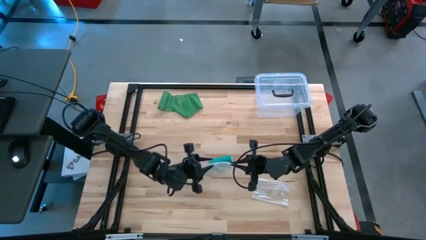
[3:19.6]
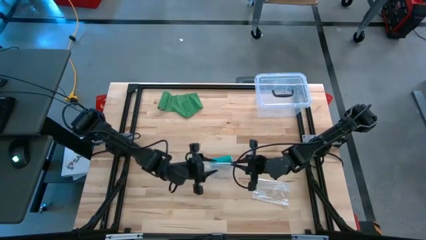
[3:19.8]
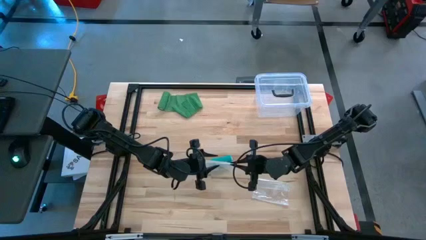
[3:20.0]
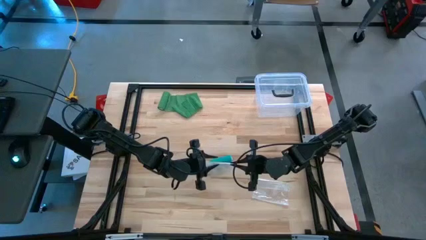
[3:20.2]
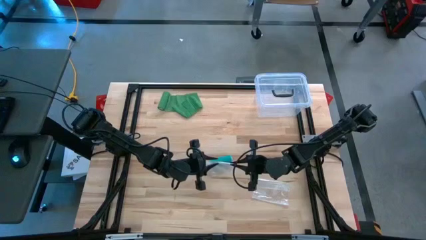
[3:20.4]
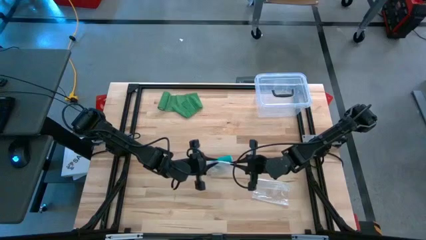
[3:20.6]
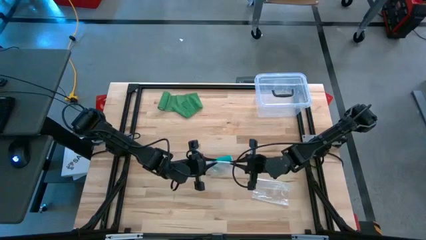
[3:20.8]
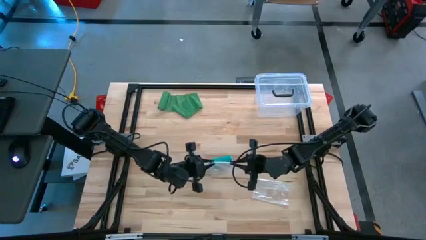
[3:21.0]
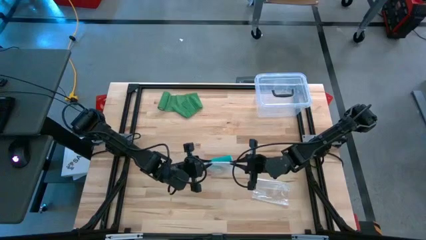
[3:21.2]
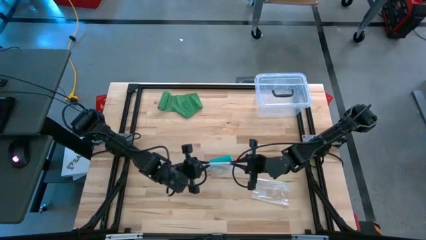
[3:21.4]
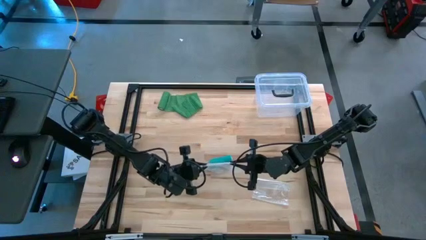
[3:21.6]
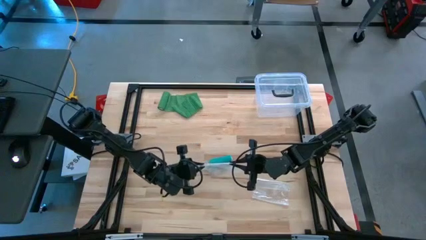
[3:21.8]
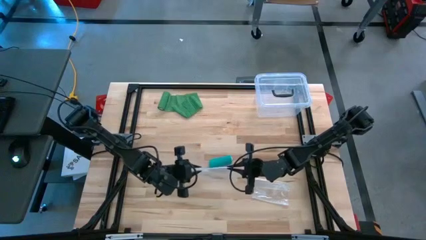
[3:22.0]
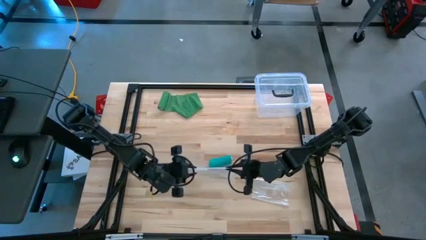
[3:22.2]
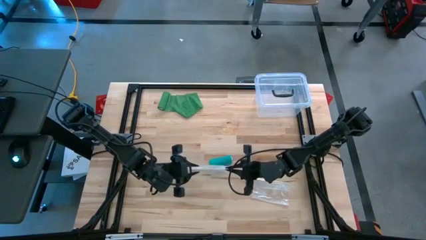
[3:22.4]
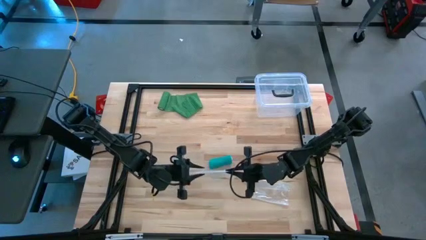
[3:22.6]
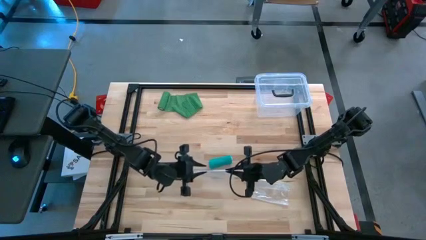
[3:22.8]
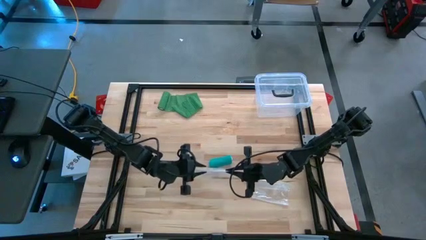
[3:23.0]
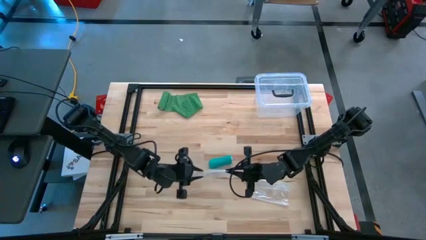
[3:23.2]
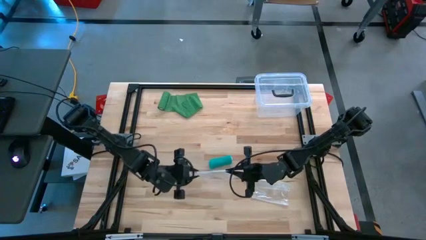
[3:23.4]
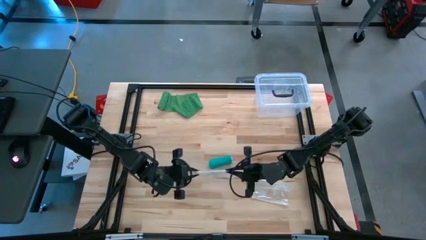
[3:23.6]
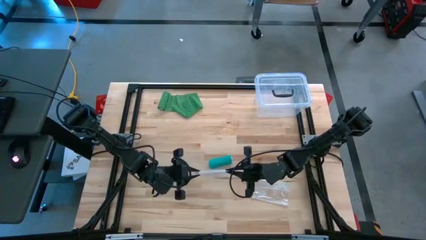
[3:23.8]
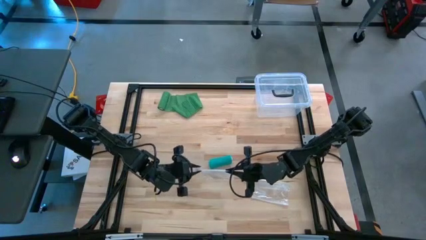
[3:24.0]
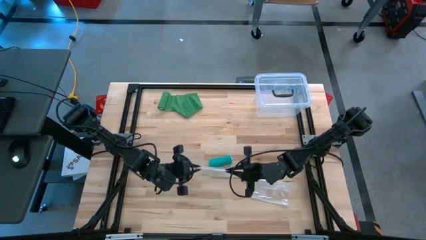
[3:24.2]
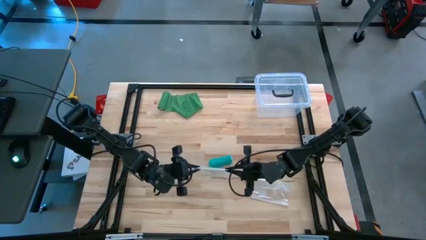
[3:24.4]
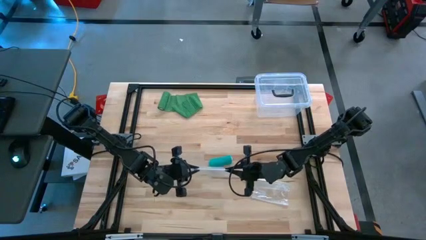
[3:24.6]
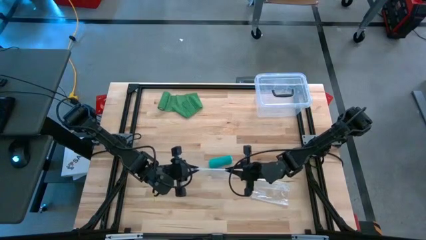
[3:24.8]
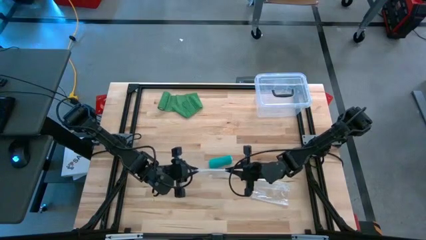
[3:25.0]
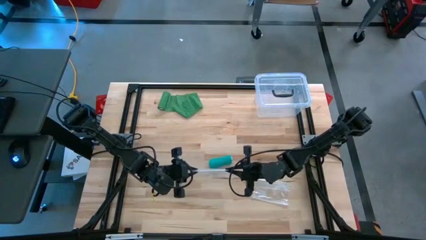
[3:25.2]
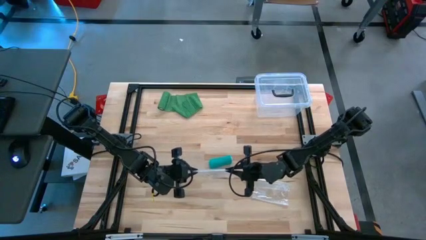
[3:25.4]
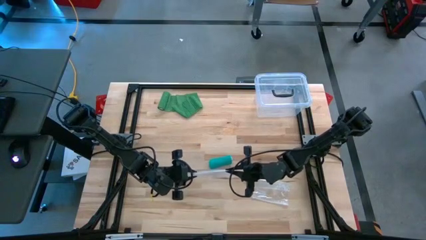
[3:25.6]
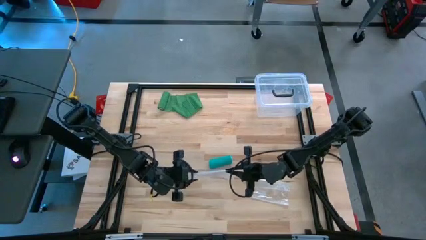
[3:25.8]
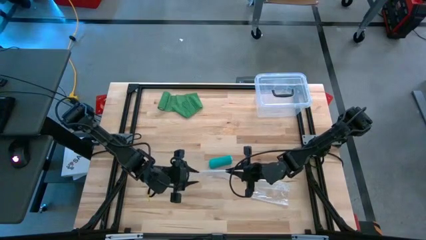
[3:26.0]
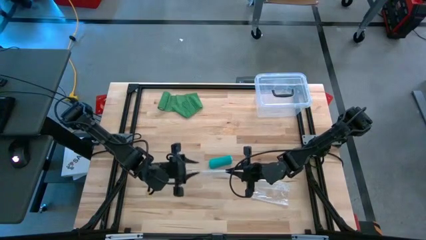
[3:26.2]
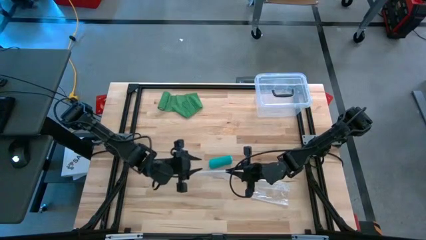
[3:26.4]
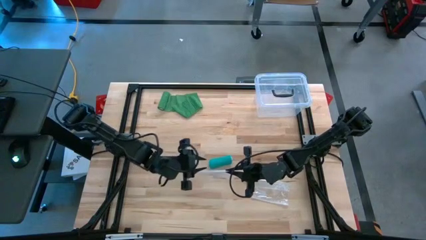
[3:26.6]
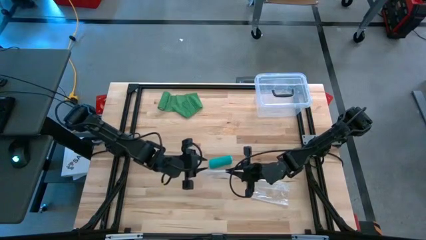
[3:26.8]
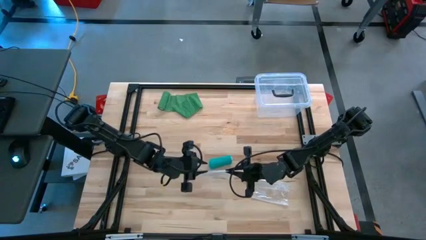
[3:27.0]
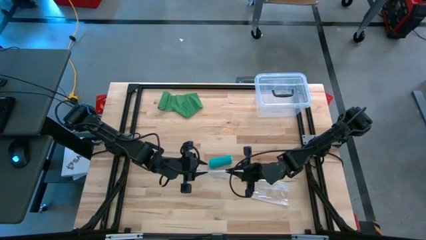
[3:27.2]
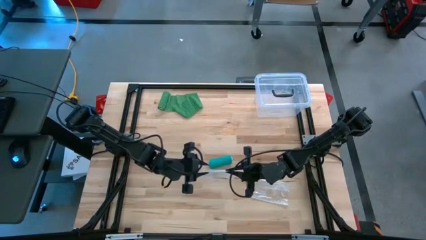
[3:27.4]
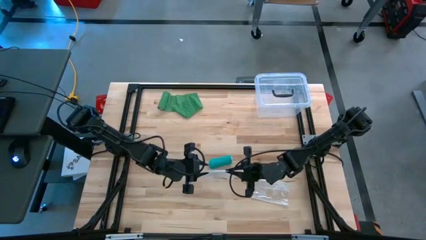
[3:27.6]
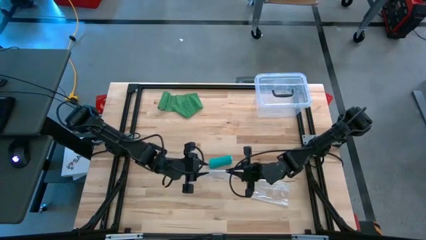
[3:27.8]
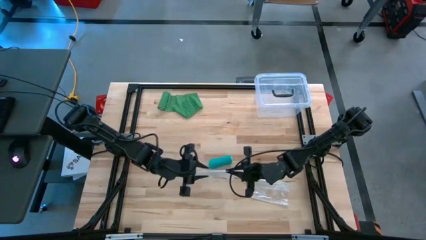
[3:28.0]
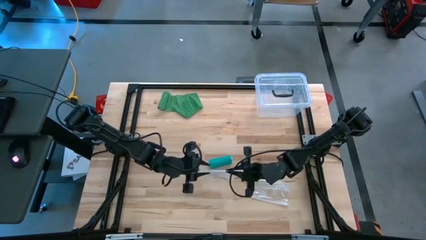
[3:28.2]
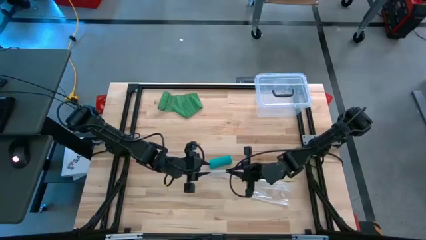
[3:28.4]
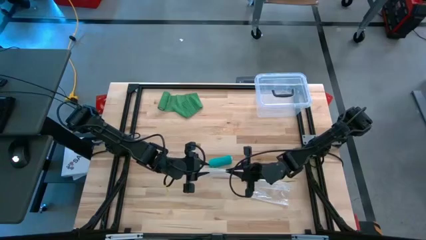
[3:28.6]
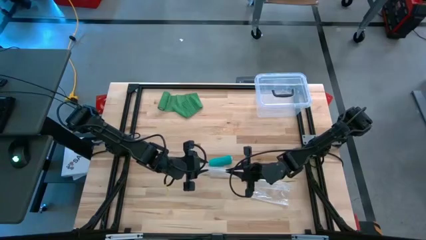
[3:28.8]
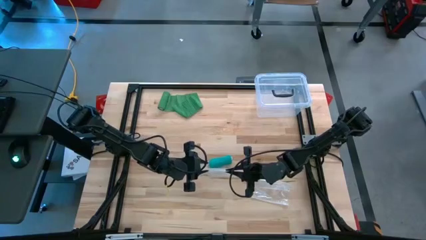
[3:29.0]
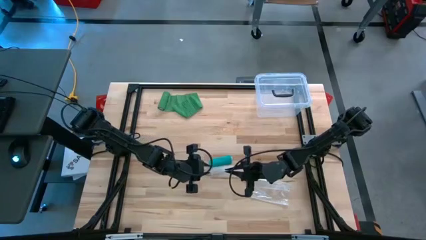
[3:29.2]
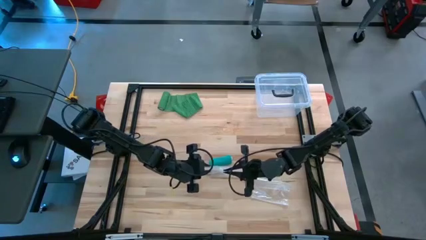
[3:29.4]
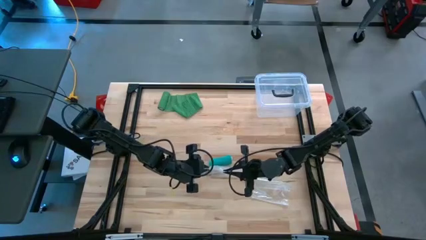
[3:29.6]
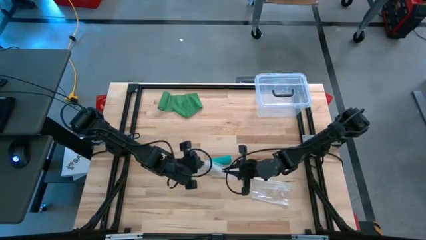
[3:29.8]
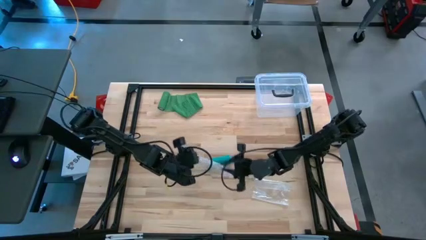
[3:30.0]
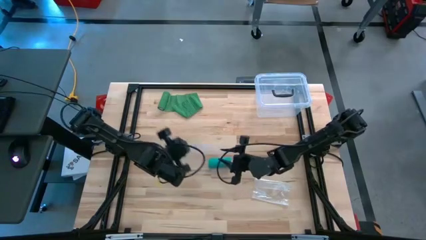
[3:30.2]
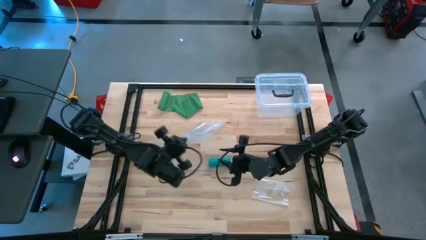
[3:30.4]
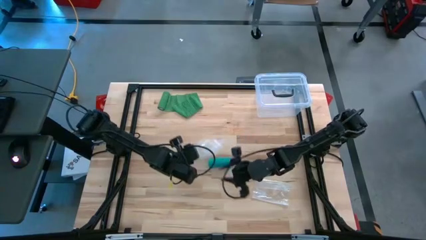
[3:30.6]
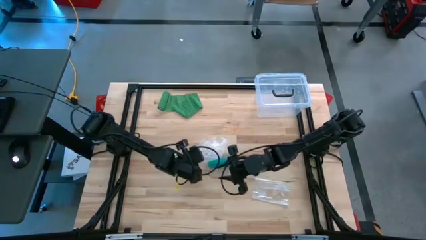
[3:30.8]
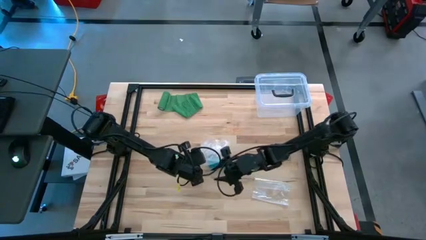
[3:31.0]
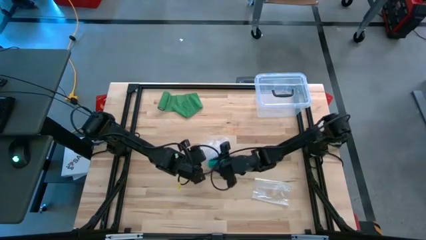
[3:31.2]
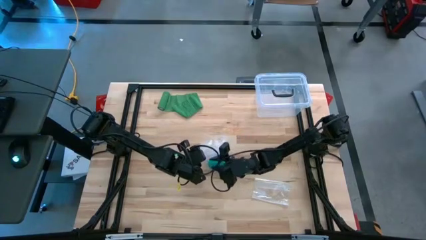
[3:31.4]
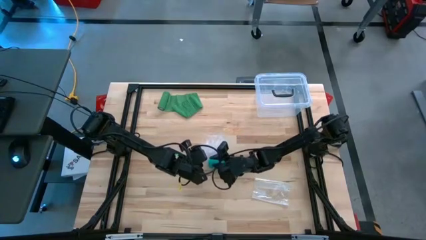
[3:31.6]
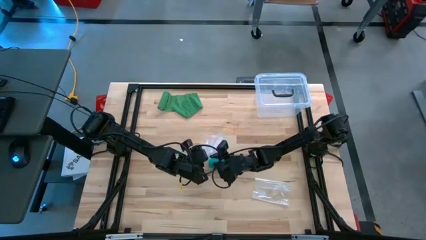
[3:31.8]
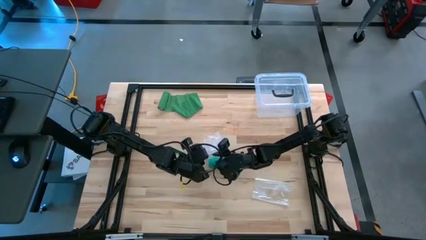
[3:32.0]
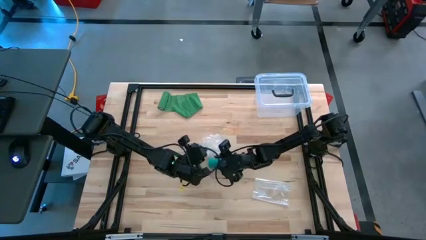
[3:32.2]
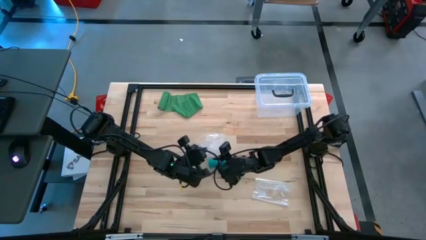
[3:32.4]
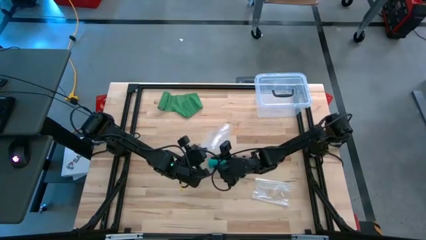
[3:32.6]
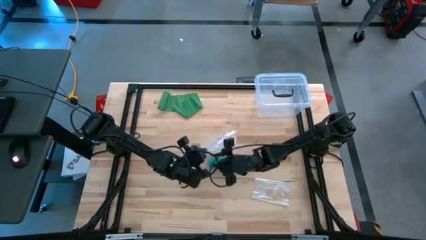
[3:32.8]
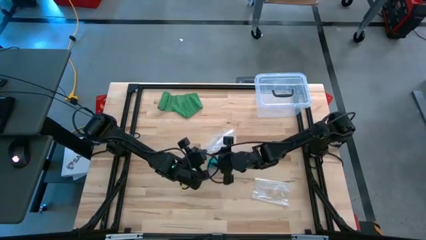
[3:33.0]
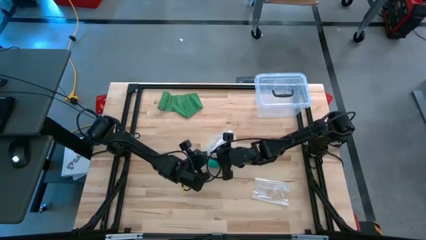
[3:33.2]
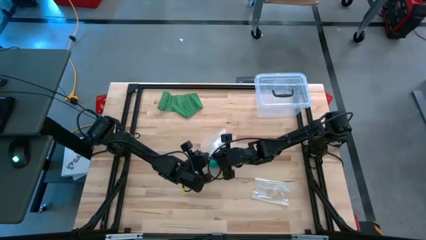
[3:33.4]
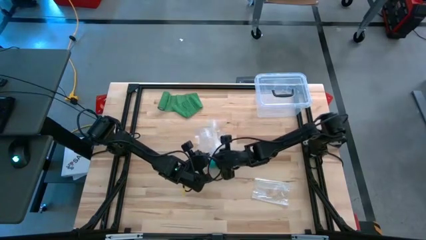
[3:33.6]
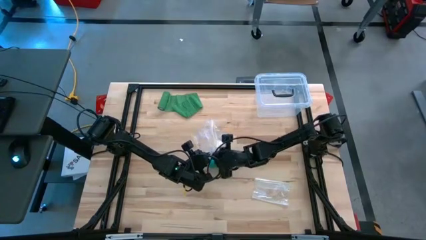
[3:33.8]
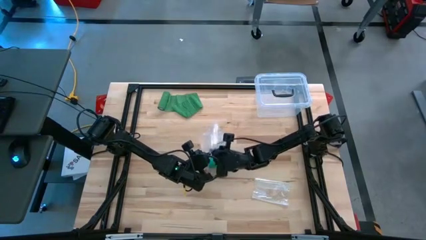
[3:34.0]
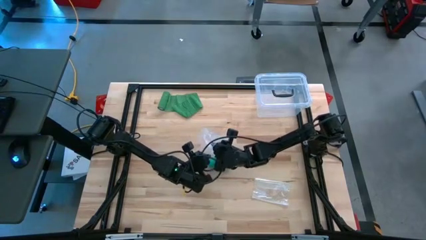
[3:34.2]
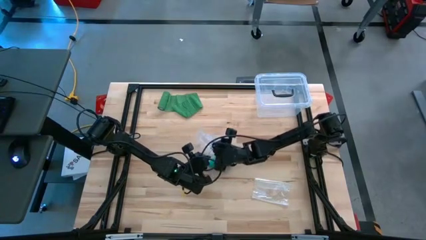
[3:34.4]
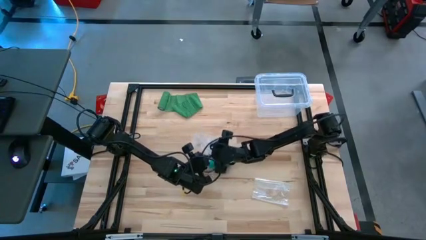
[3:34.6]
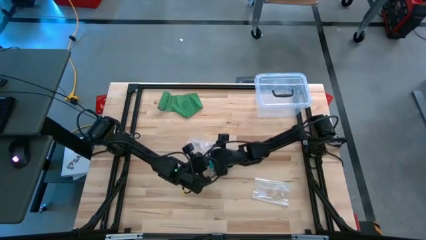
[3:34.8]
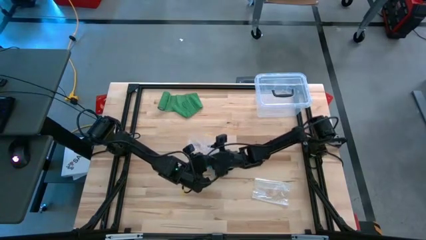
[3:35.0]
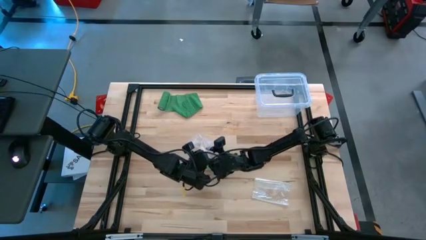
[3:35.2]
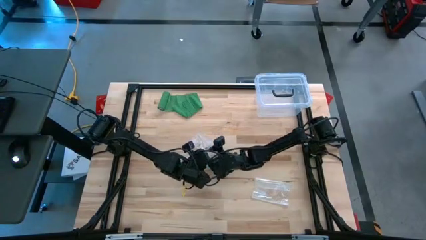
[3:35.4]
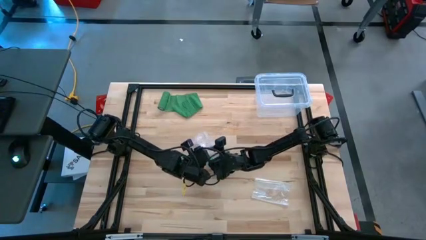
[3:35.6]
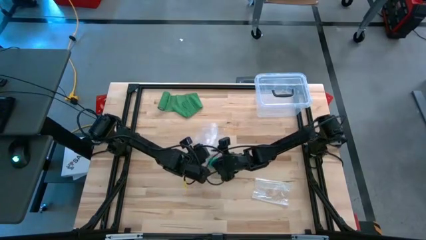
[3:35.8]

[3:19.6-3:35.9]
Task: Roll bandage
Open the transparent zip bag
